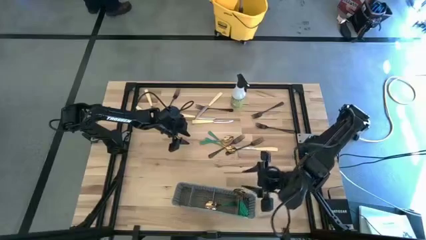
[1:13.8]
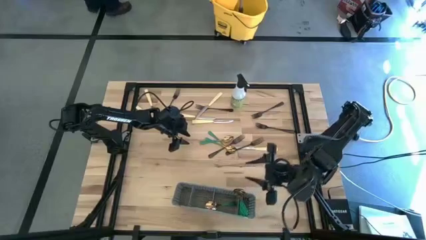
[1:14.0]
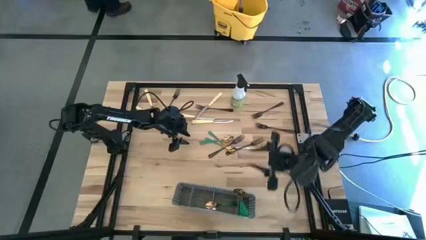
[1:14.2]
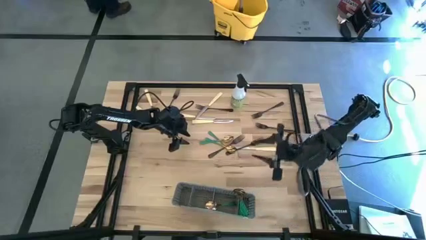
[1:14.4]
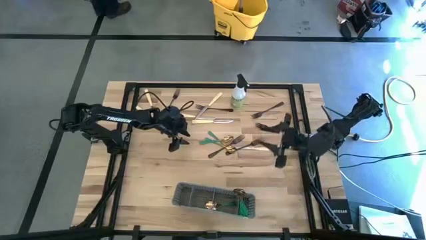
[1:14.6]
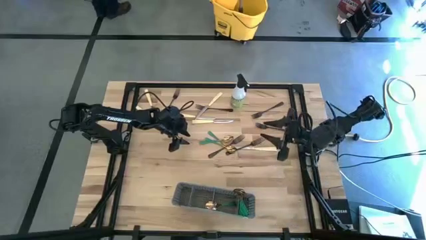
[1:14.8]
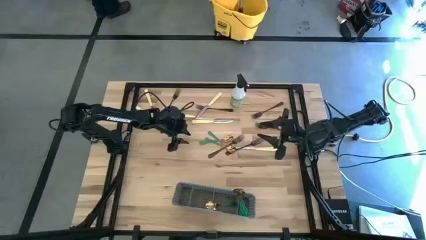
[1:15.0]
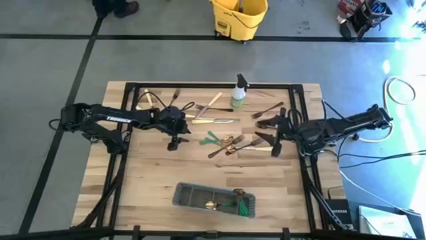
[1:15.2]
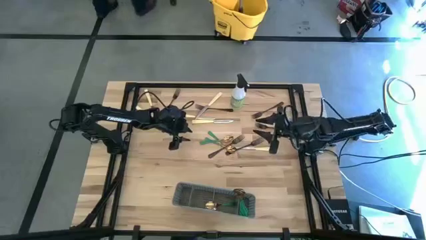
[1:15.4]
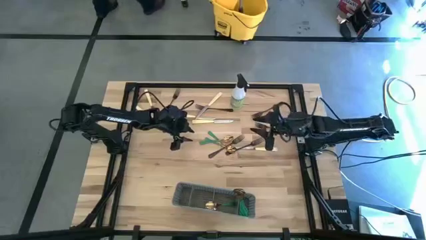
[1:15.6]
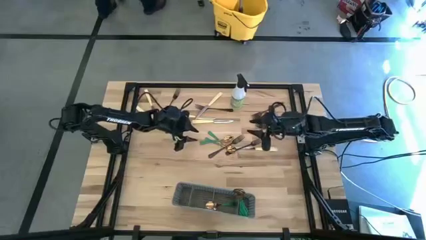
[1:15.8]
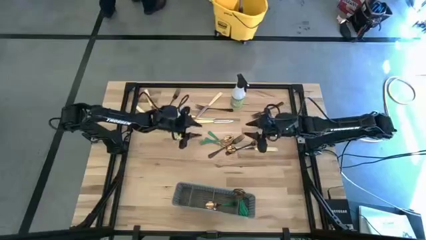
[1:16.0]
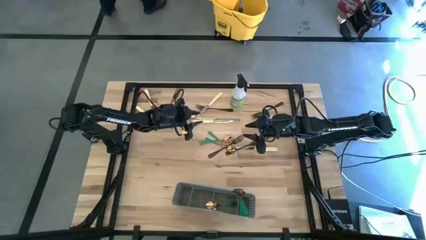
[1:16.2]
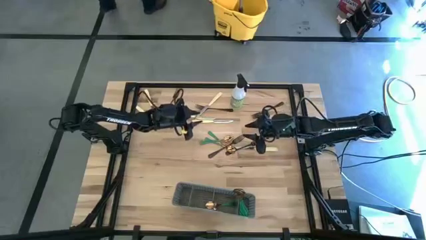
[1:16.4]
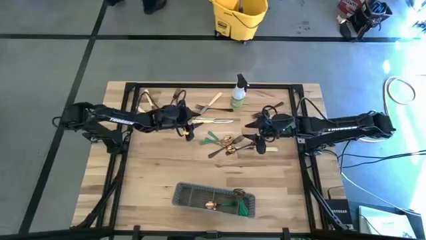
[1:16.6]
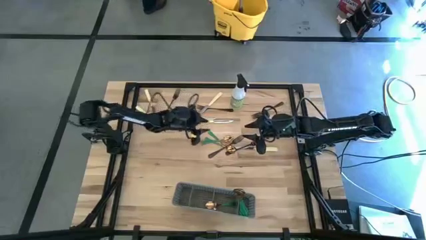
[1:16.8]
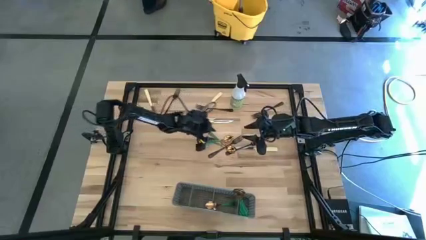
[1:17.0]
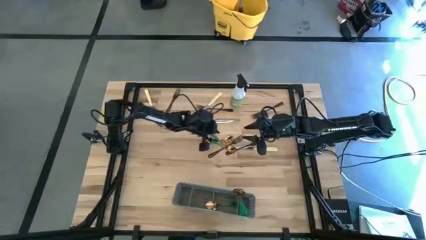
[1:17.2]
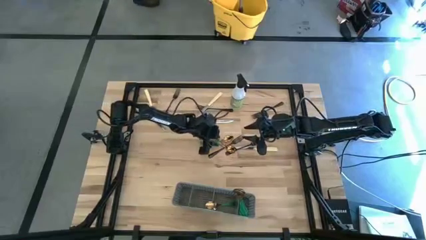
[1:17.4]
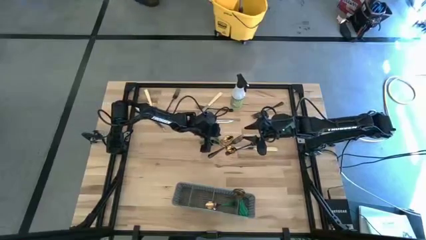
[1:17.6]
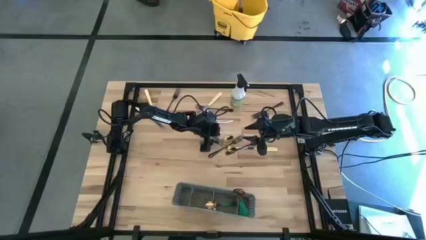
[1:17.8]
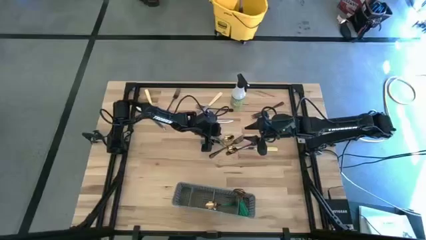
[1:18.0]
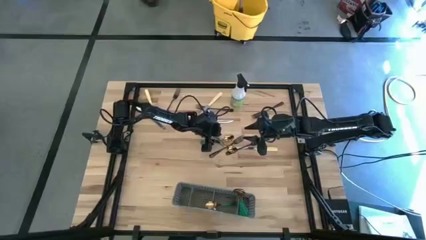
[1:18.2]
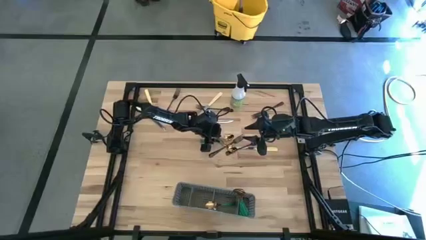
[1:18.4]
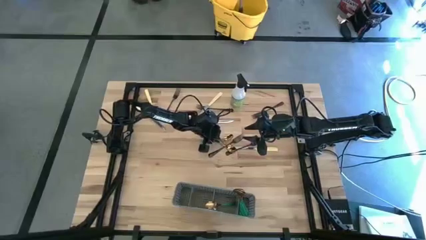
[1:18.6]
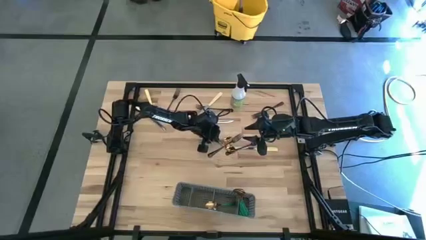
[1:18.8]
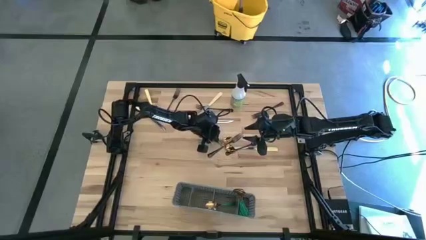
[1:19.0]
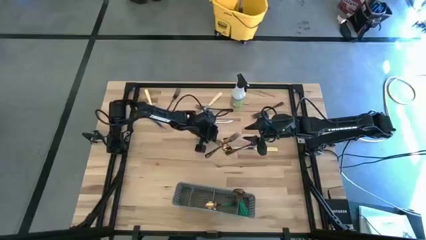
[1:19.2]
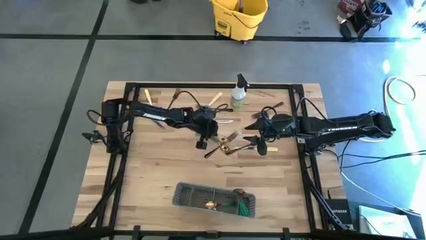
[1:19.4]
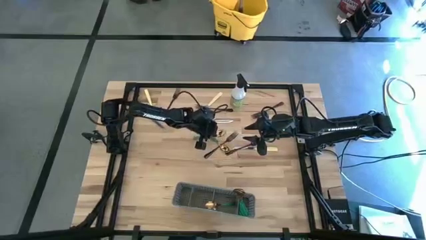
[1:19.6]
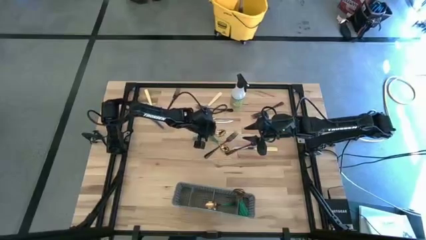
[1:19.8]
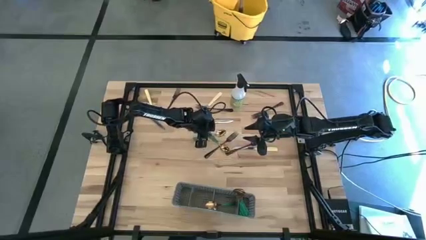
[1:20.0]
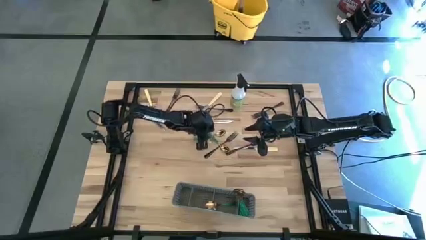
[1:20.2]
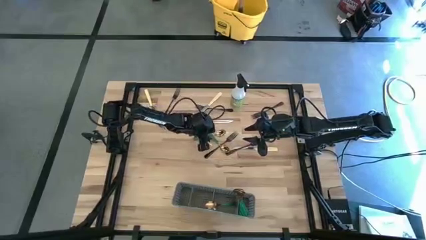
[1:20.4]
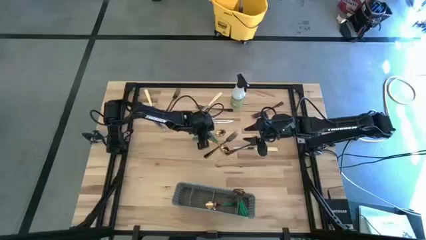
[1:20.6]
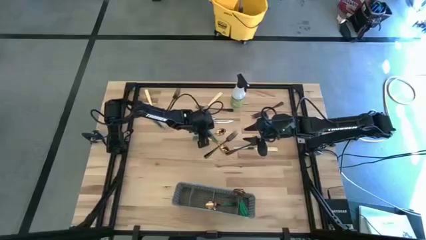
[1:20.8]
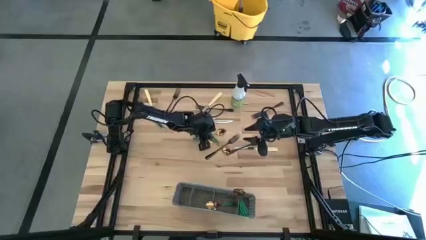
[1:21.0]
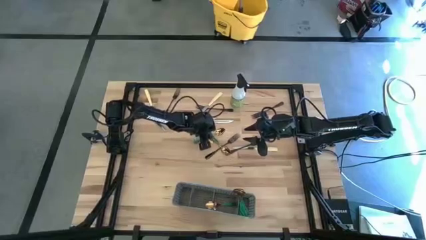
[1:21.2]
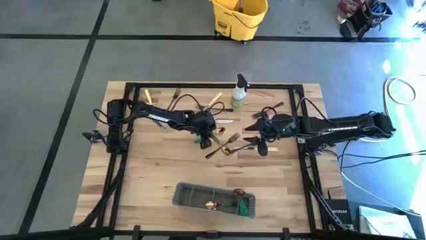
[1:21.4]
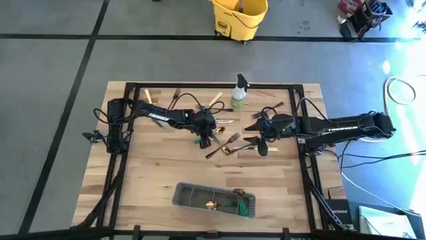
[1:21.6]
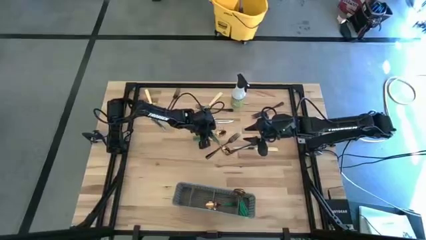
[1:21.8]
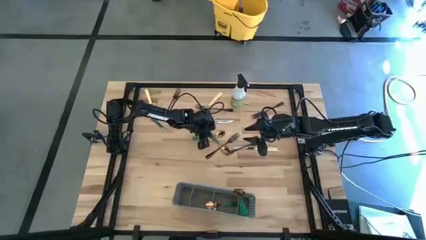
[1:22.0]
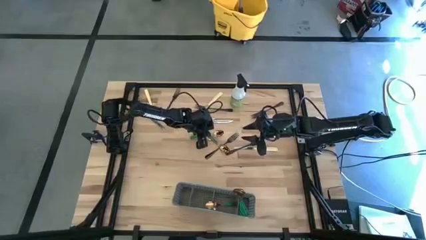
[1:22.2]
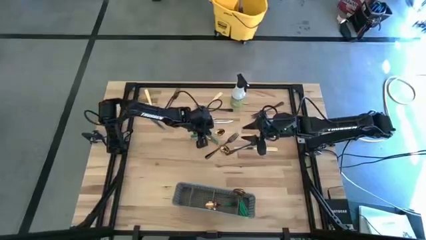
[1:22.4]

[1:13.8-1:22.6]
Task: Sort silverware
Put the top green spoon into the gray cutlery rack

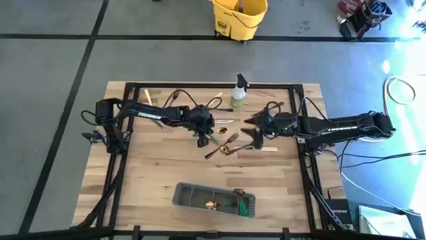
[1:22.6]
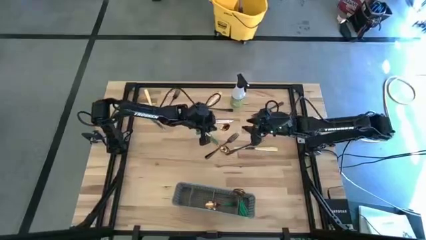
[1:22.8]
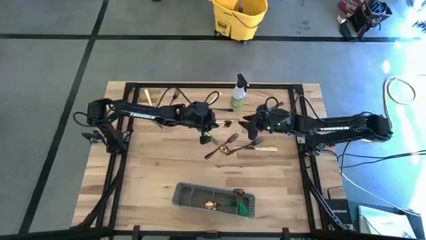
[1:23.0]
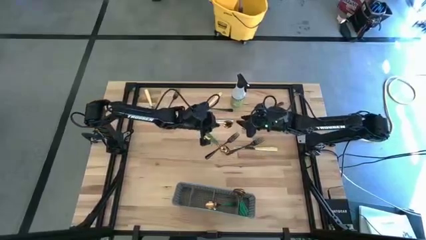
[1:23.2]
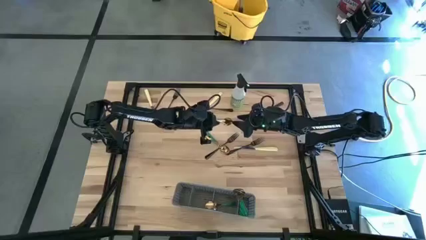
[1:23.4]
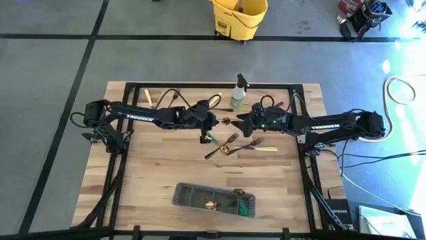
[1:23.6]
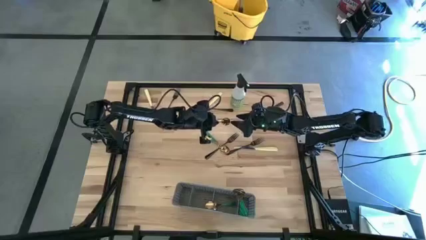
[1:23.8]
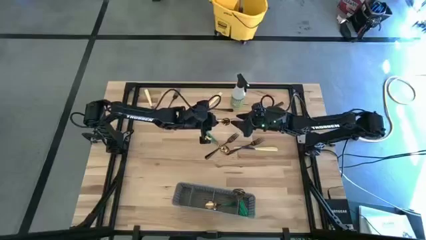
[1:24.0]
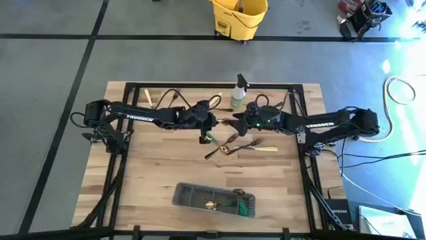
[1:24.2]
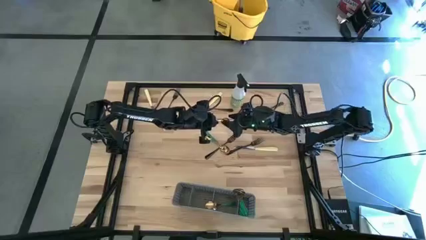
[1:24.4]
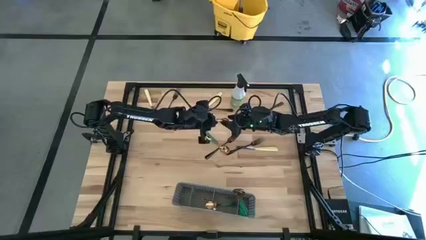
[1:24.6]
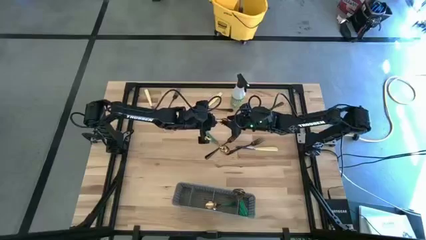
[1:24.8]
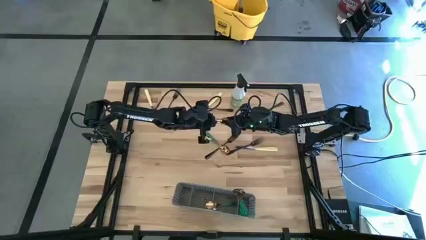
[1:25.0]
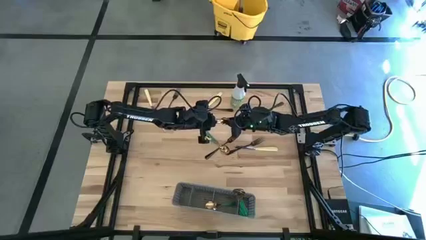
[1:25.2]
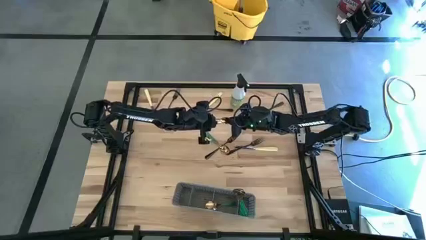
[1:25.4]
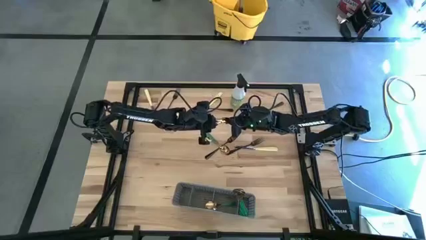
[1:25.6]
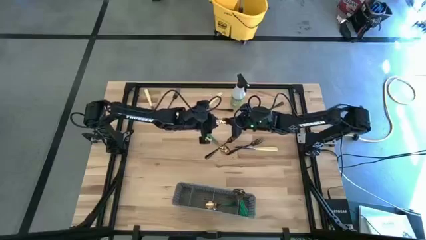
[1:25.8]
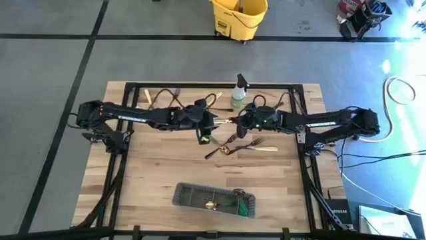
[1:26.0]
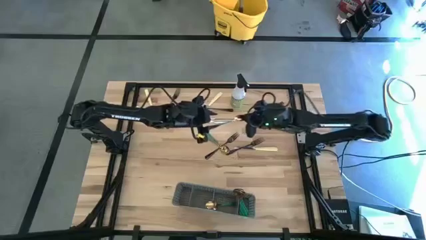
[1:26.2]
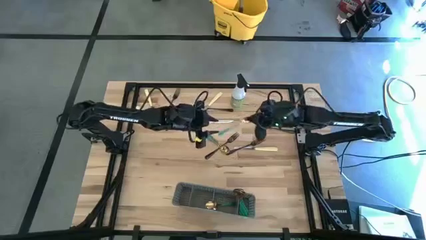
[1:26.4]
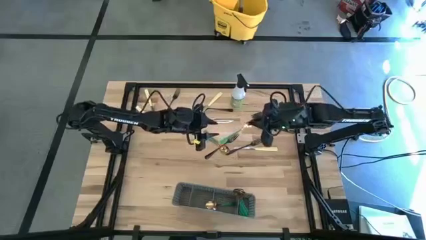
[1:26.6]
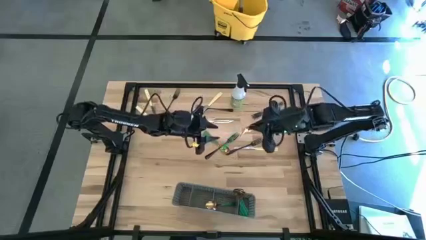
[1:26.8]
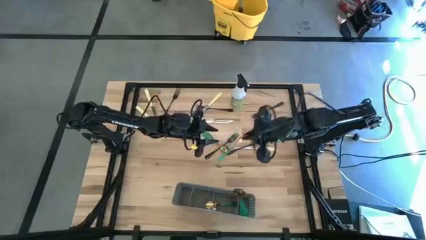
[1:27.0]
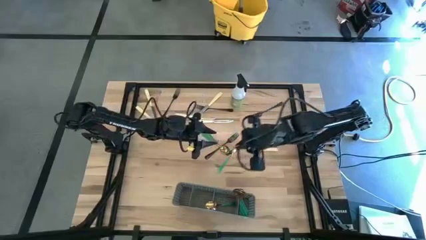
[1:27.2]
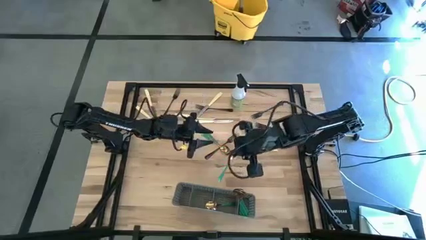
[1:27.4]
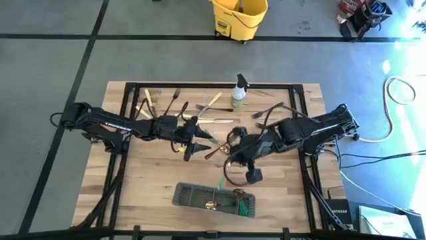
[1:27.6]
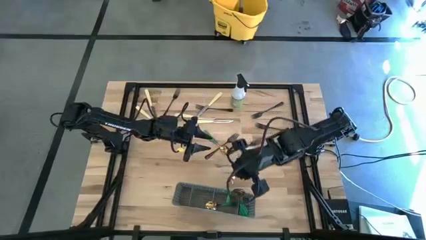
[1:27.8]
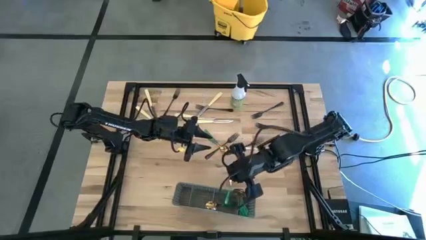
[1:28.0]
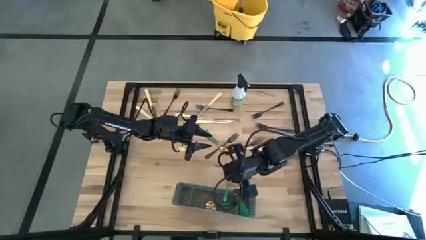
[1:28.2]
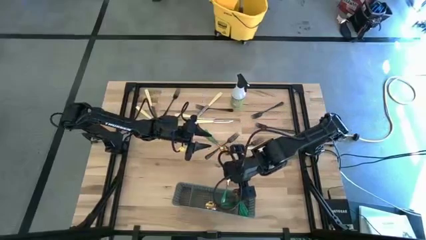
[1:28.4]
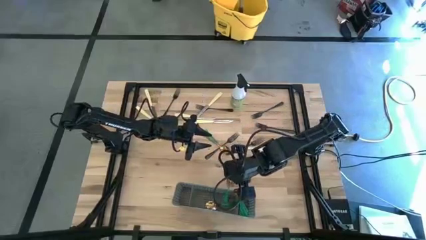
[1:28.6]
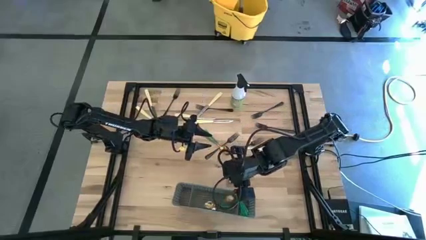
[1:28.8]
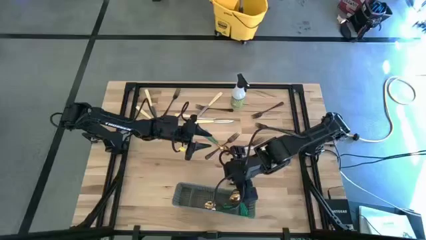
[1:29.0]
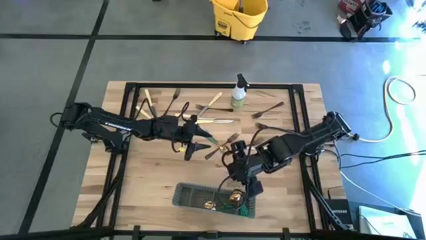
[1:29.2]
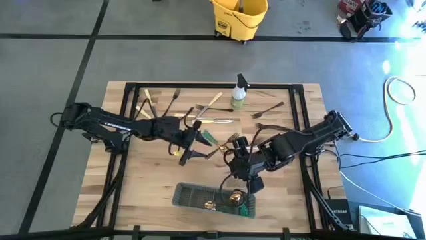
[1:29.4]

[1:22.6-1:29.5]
Put the top green spoon into the gray cutlery rack
